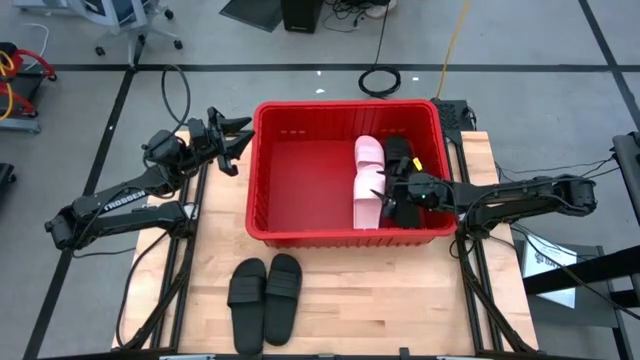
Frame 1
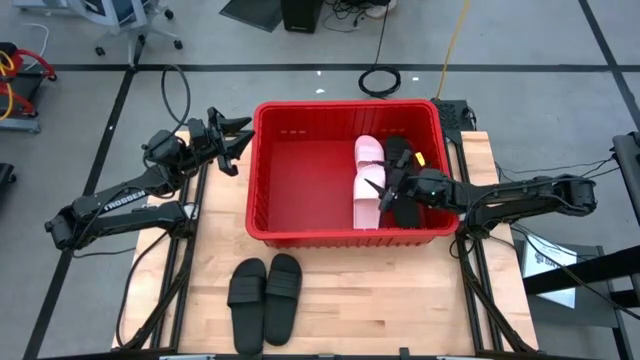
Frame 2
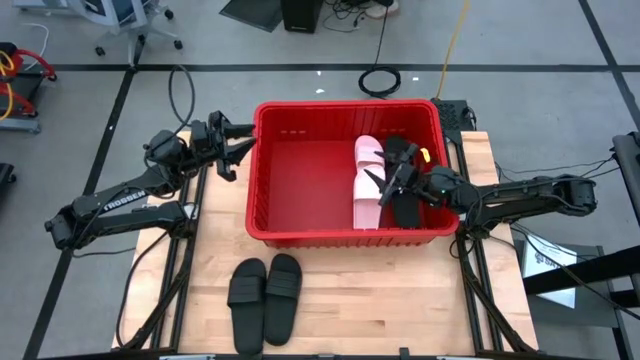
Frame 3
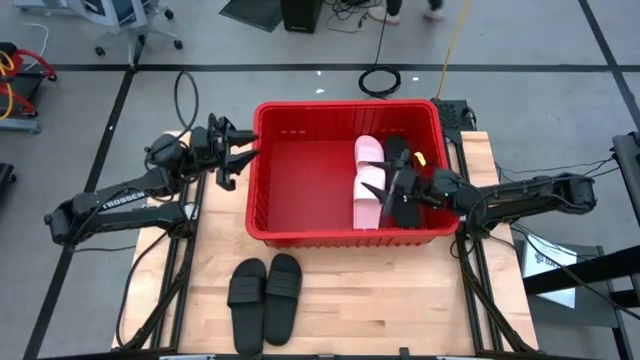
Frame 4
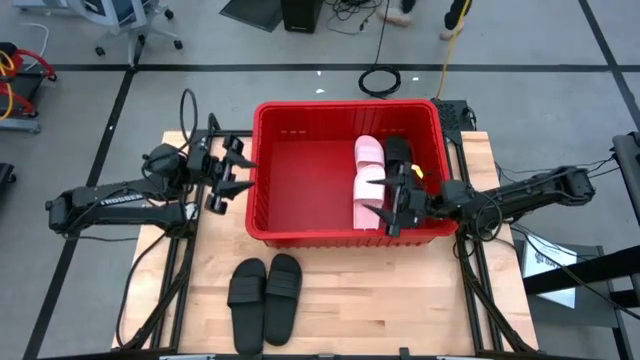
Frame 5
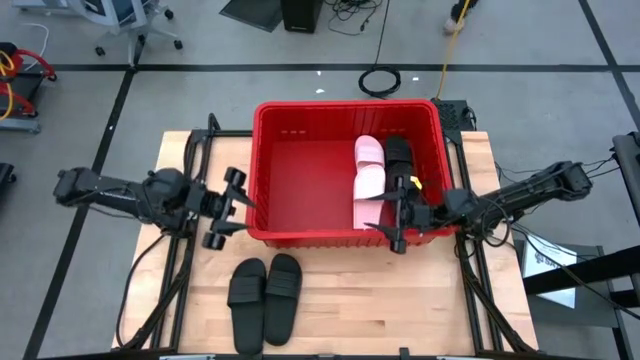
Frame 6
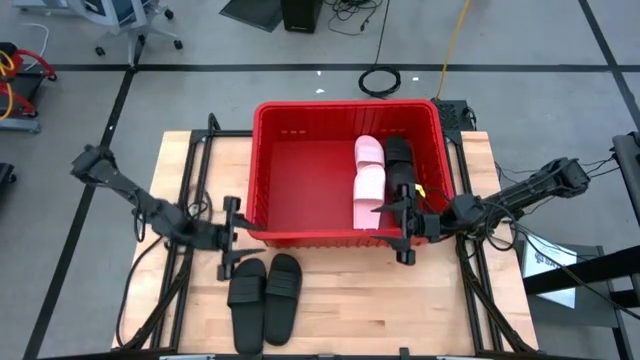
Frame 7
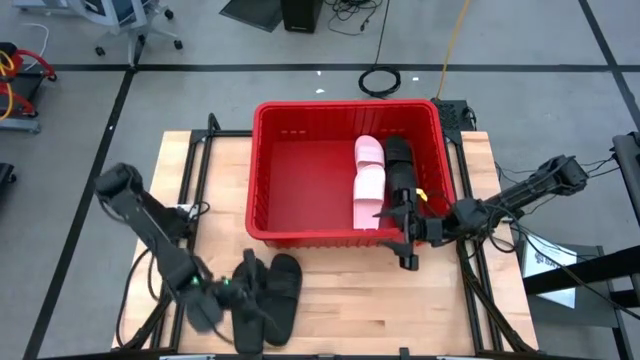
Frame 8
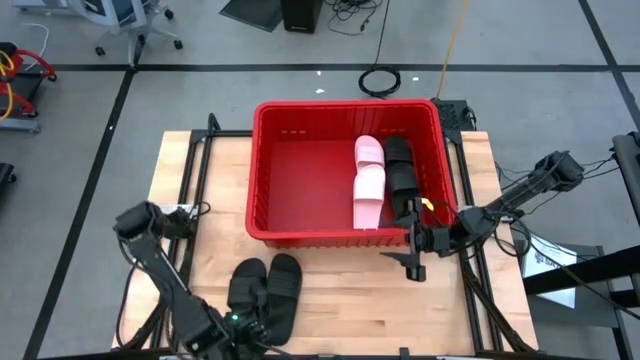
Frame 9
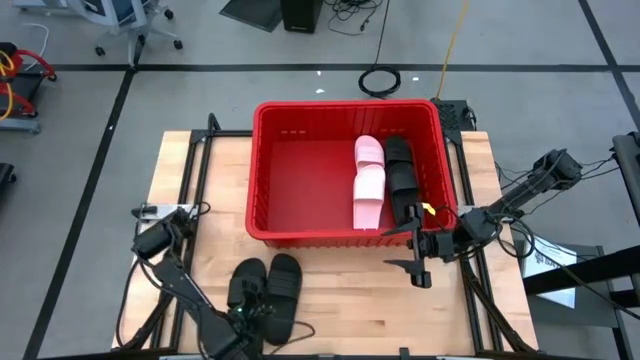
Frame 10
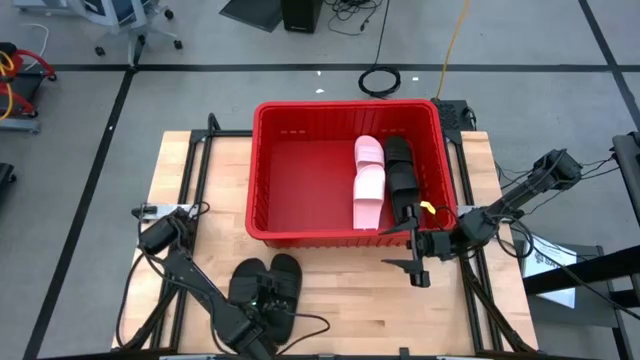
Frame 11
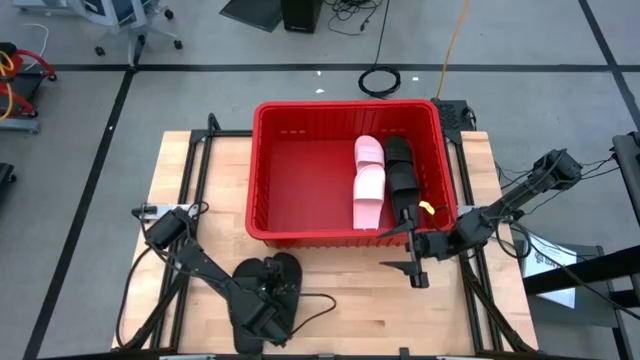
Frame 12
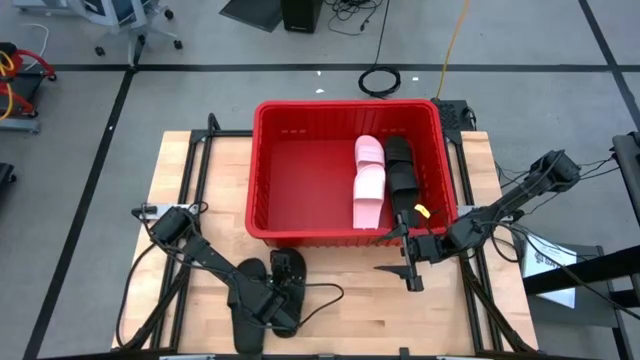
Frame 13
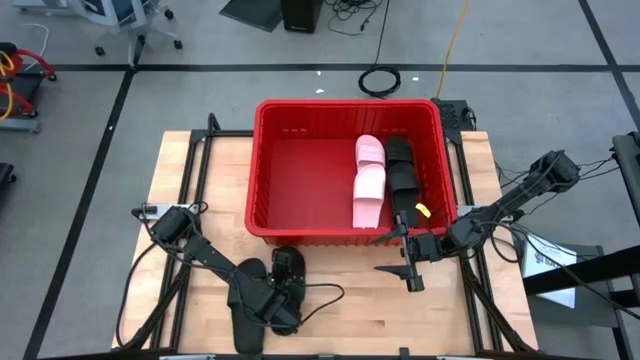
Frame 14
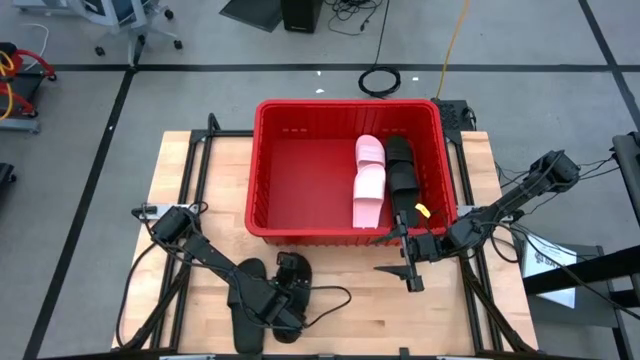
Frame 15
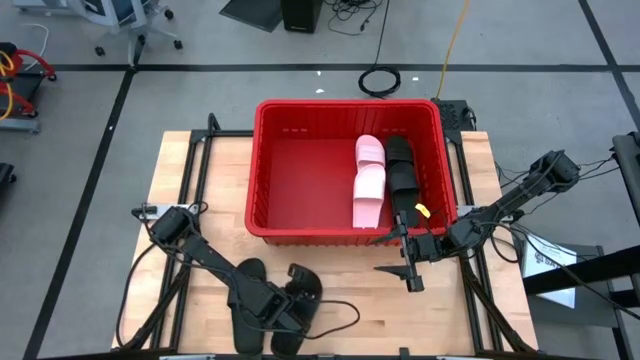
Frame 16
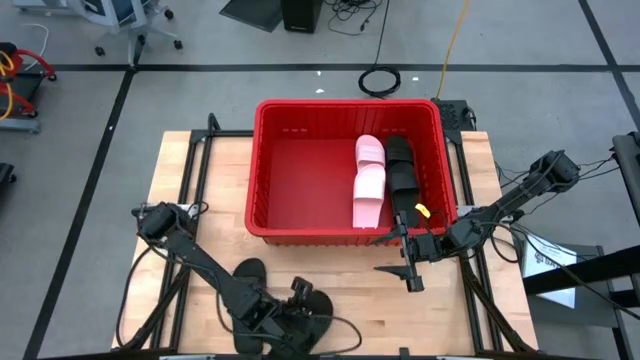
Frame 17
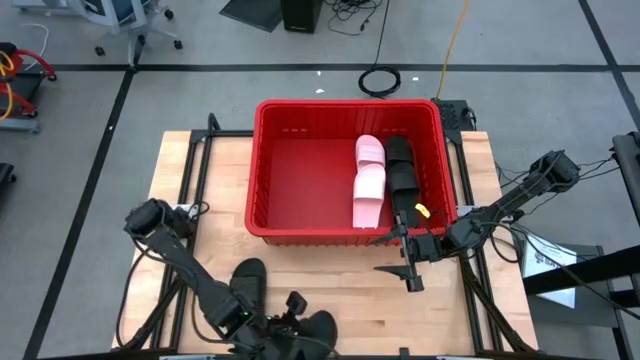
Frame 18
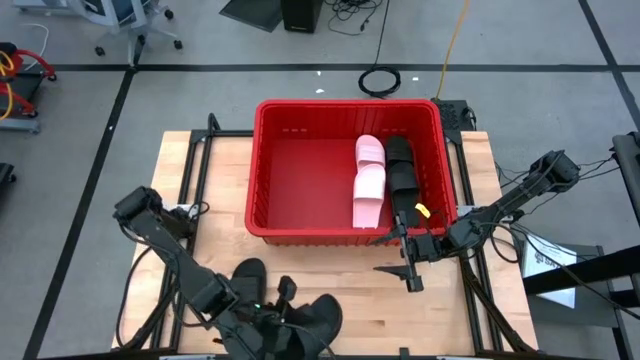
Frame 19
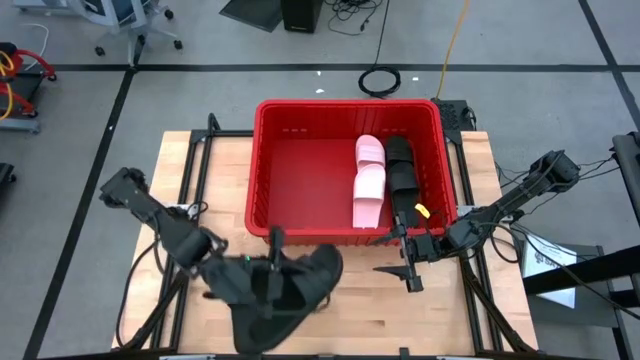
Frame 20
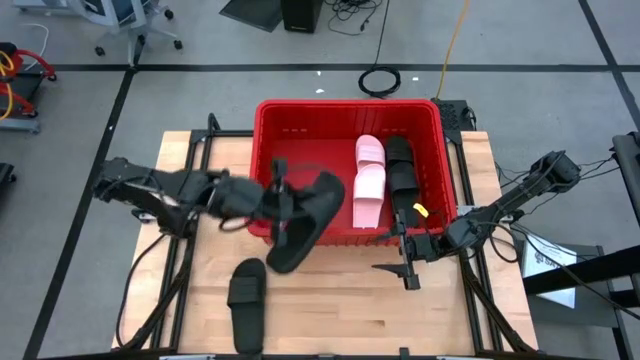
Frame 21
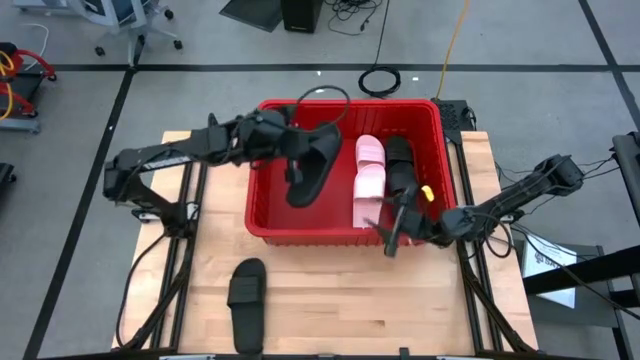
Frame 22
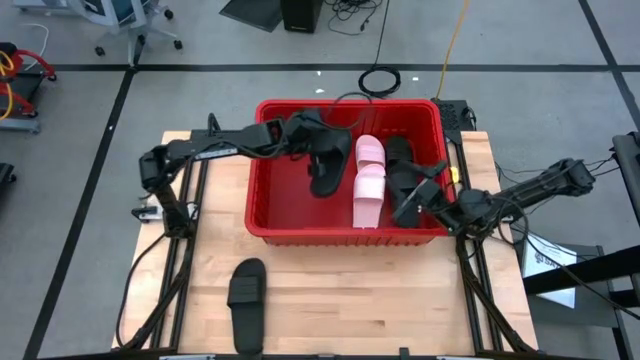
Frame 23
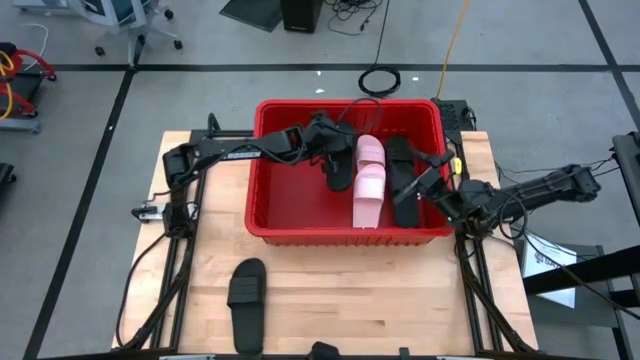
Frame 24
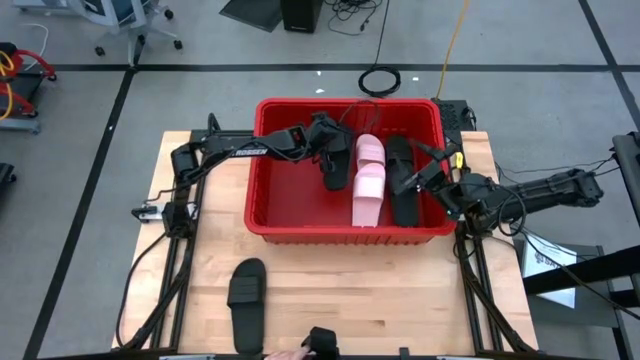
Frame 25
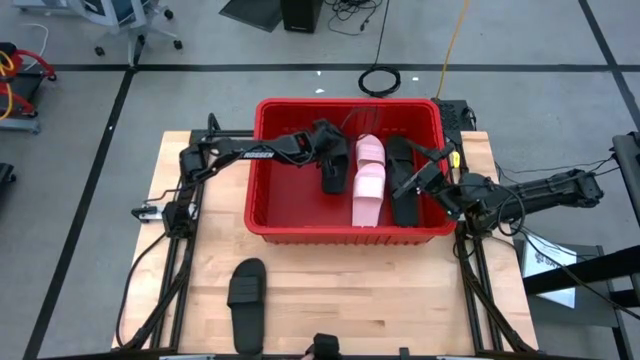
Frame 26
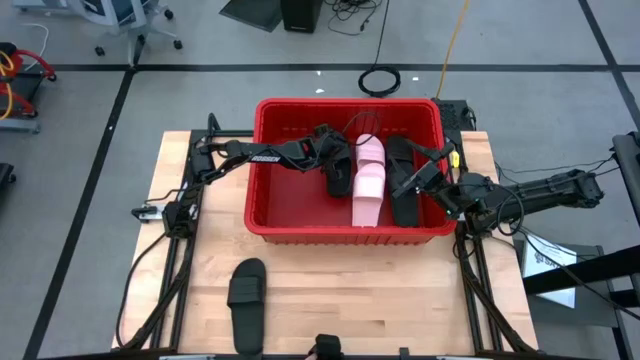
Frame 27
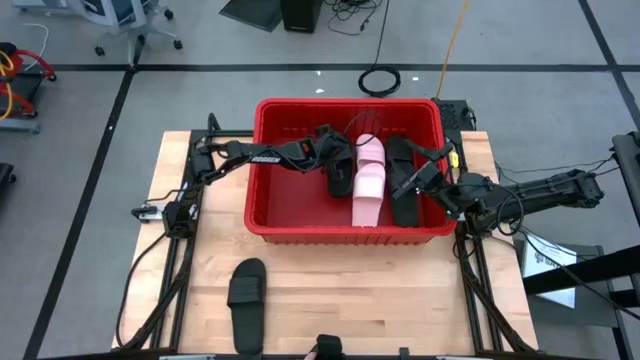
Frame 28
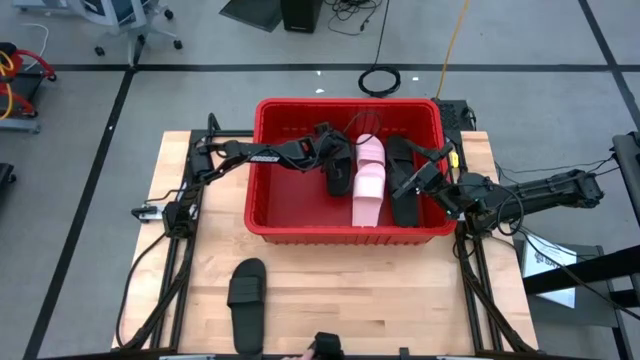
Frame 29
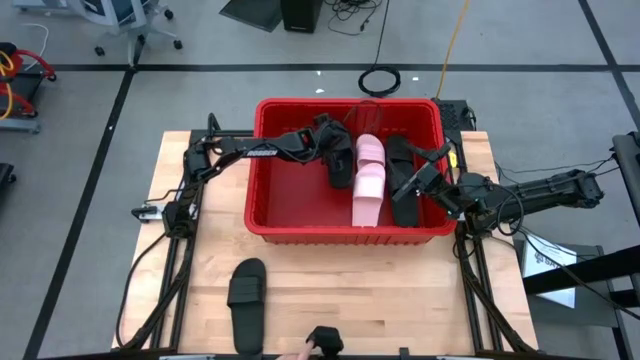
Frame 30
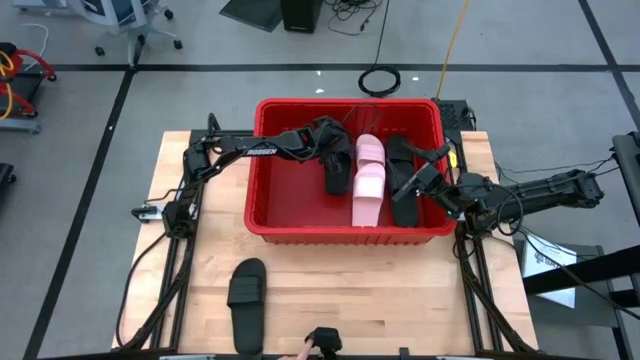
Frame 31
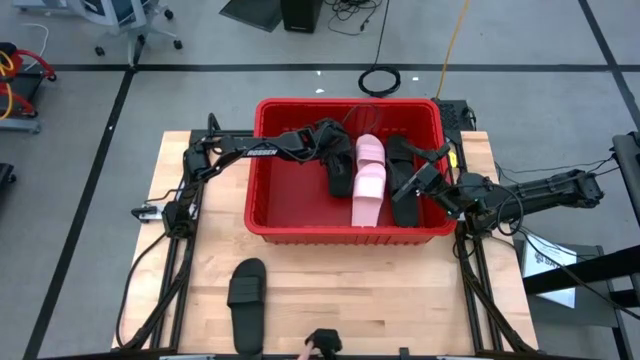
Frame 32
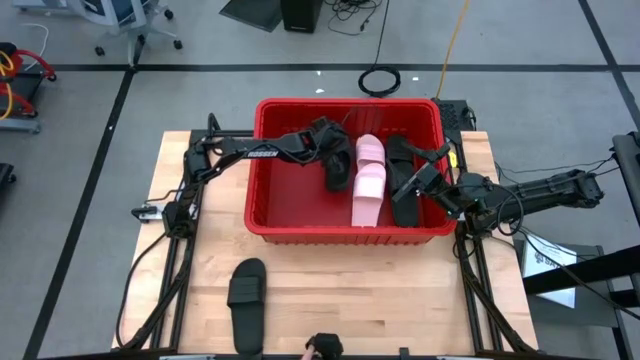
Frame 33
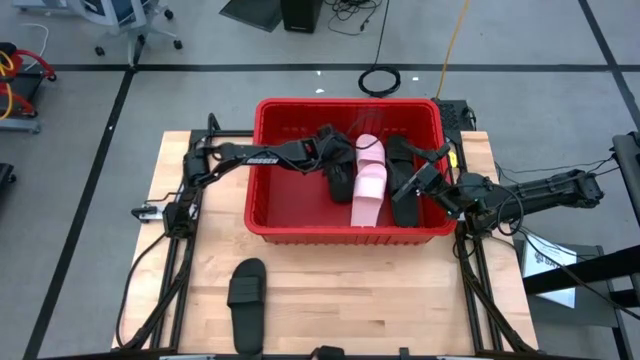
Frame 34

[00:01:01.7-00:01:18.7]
Task: Pick and place slides into bin
Put the black slipper into the red container

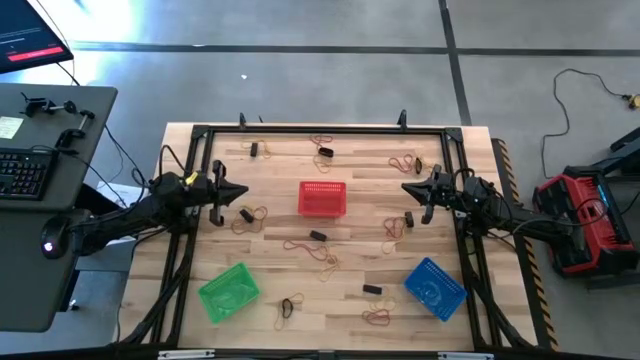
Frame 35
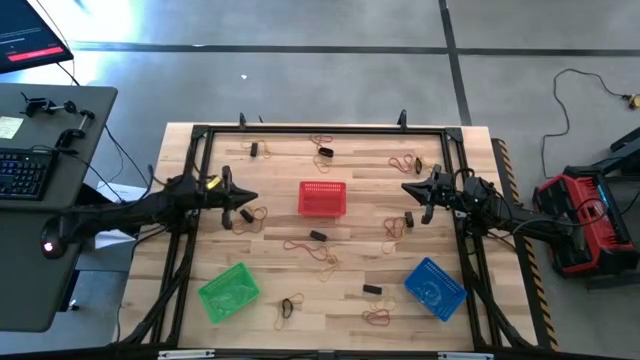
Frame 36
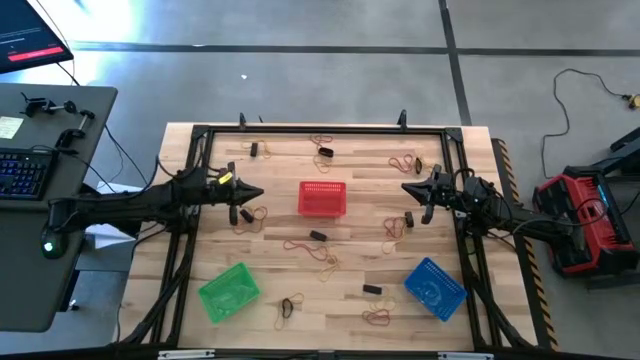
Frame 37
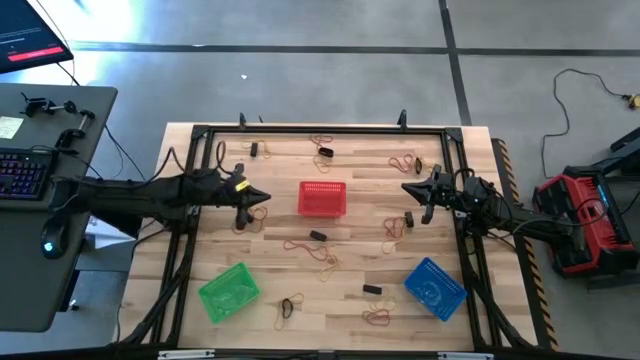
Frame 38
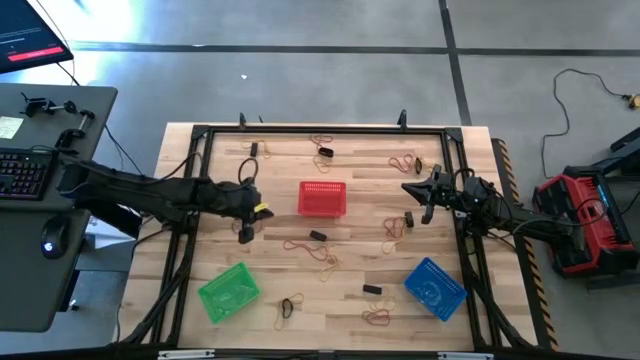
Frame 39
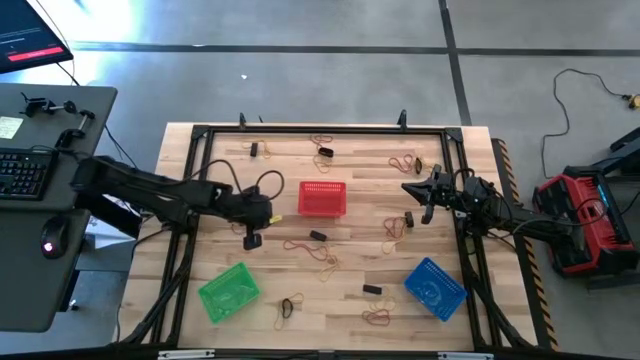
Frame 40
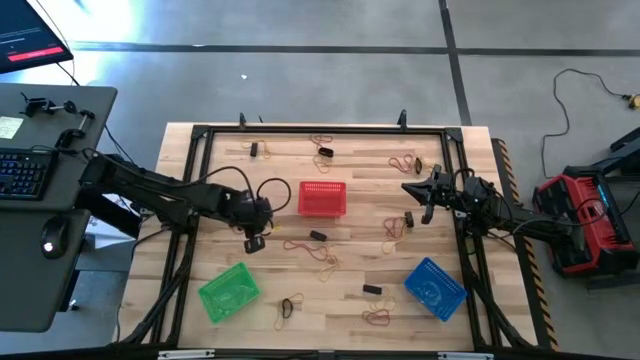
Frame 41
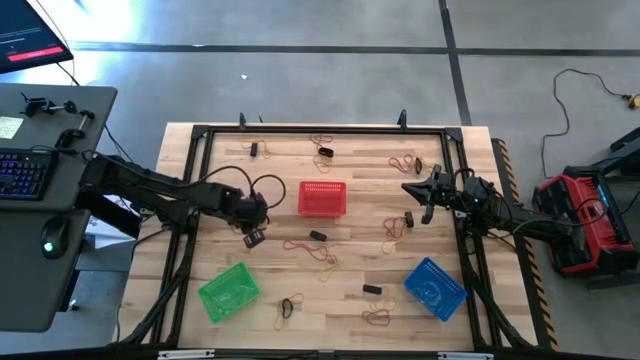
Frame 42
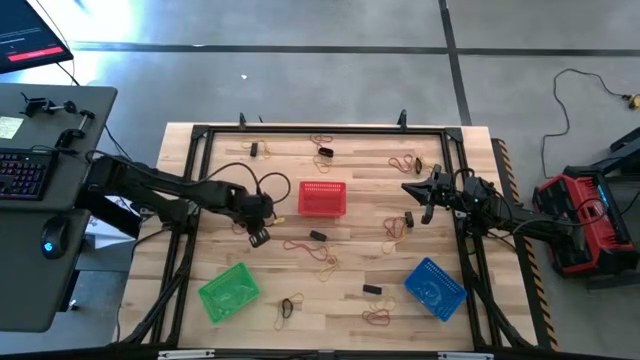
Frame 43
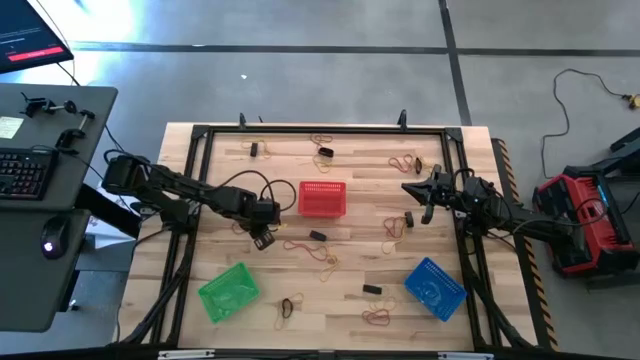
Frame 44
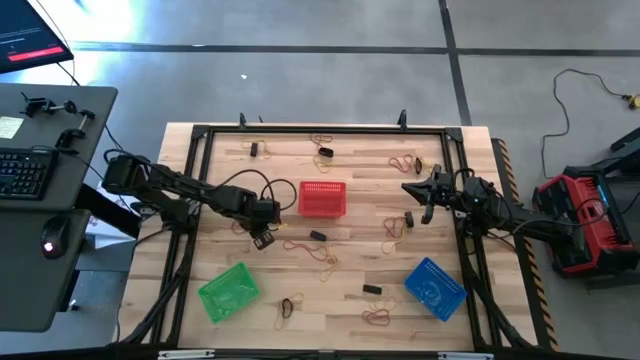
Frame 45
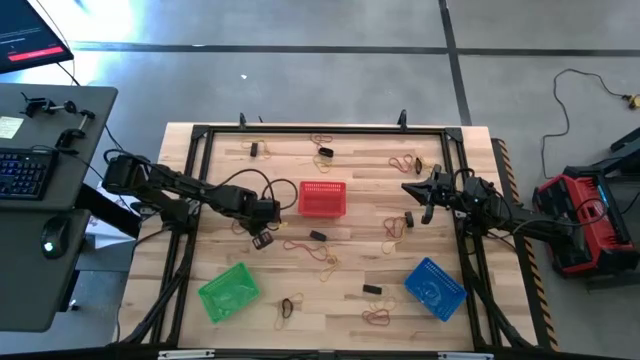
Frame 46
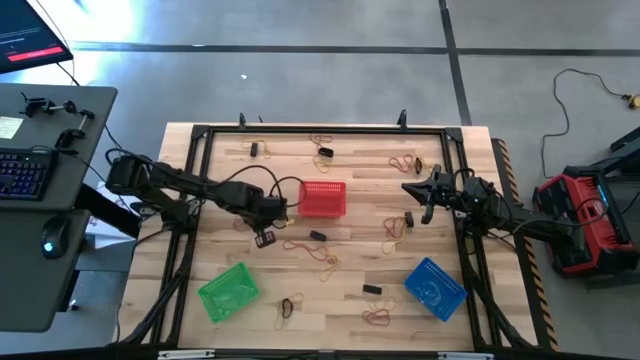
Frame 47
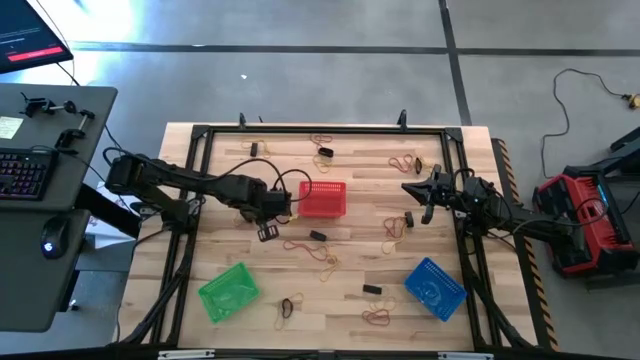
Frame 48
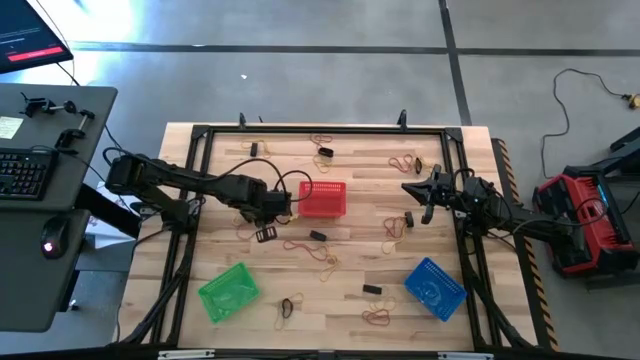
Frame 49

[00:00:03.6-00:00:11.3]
Task: Sort rubber bands into baskets
Put the red rubber band into the red bin
